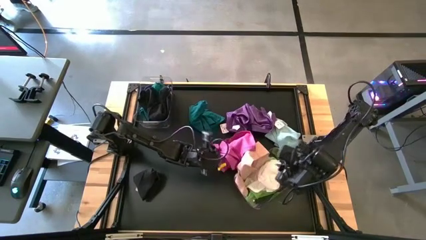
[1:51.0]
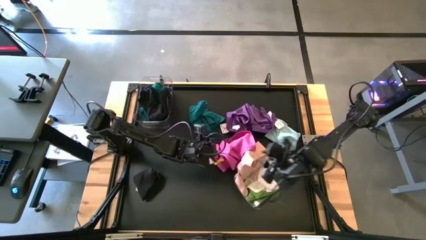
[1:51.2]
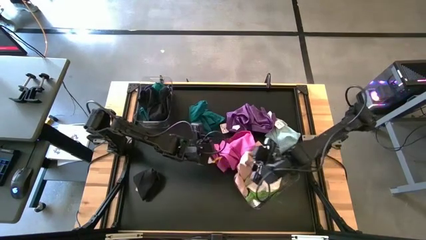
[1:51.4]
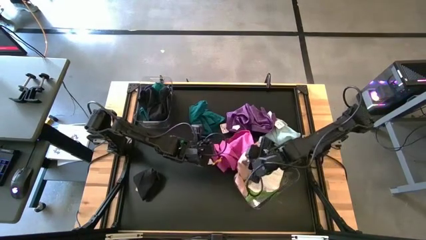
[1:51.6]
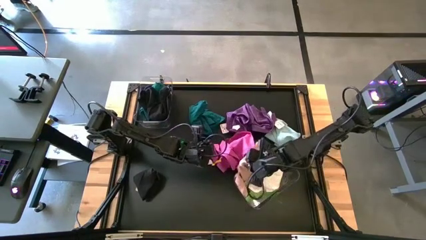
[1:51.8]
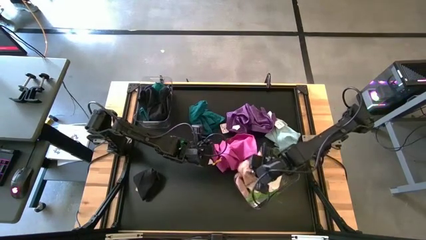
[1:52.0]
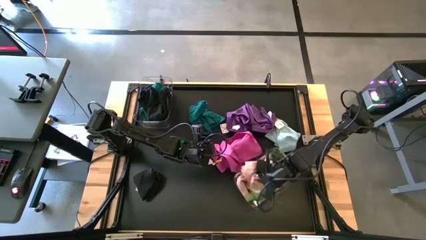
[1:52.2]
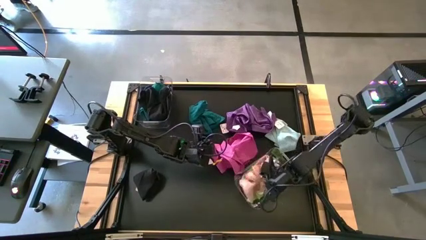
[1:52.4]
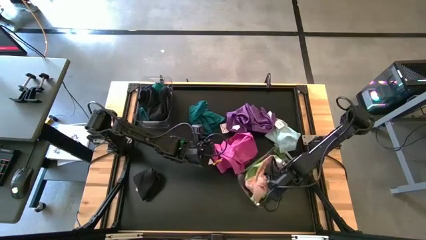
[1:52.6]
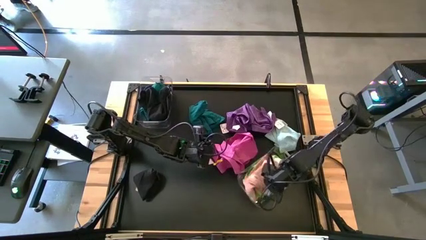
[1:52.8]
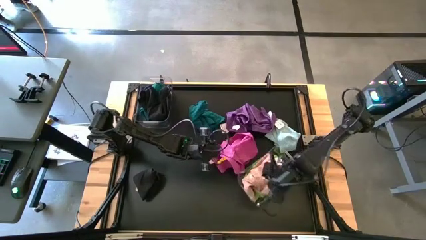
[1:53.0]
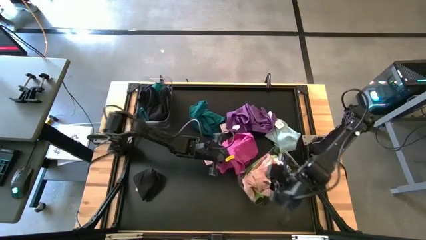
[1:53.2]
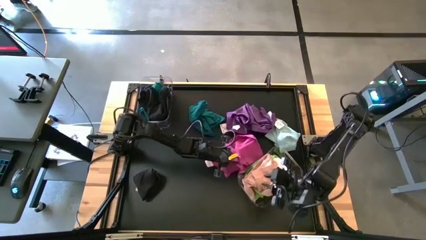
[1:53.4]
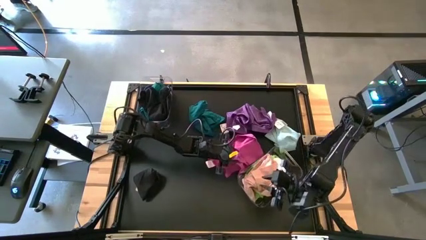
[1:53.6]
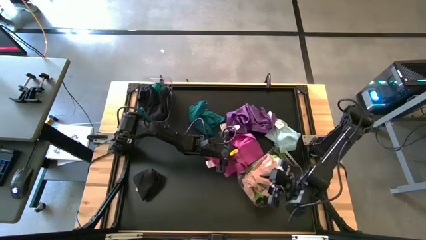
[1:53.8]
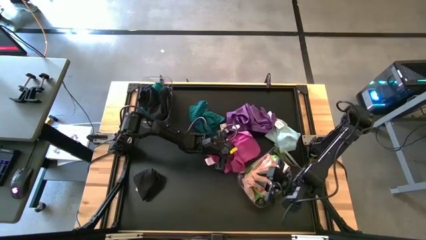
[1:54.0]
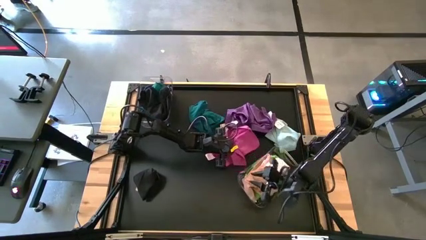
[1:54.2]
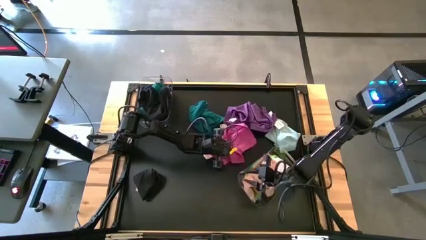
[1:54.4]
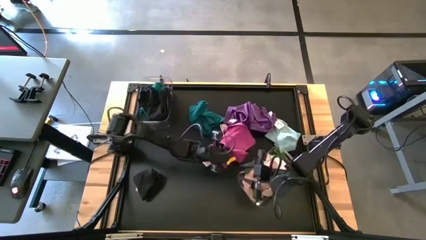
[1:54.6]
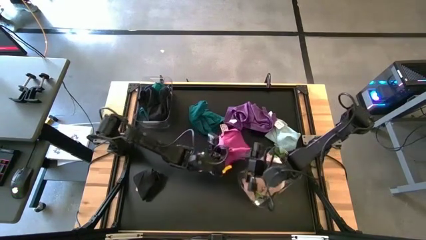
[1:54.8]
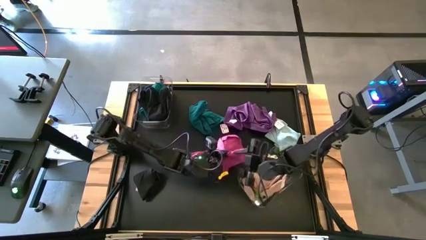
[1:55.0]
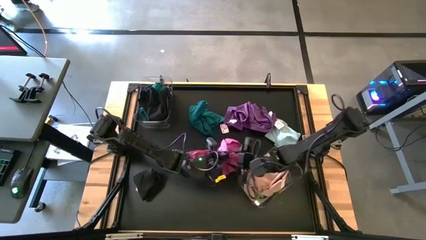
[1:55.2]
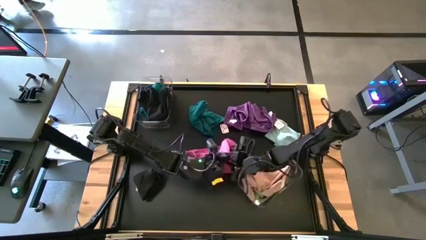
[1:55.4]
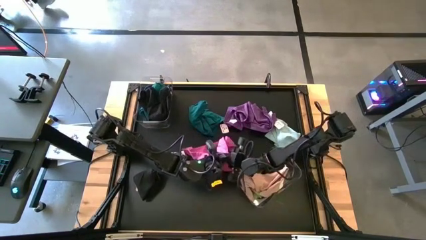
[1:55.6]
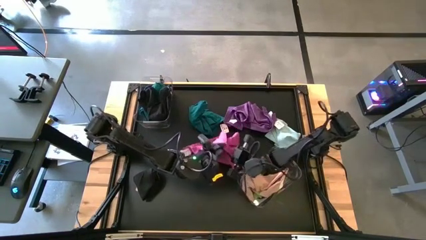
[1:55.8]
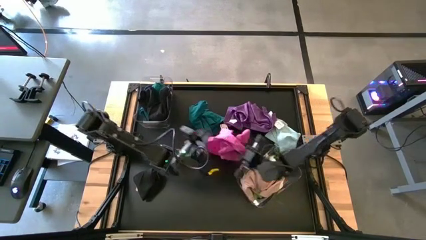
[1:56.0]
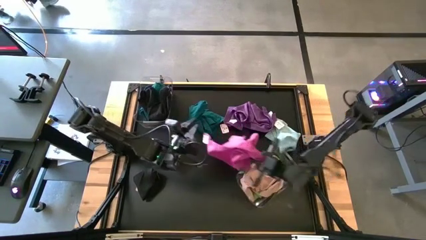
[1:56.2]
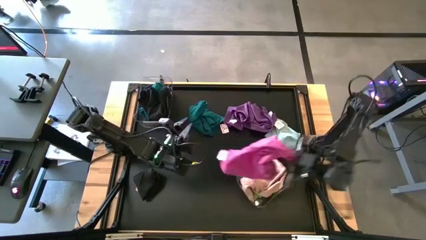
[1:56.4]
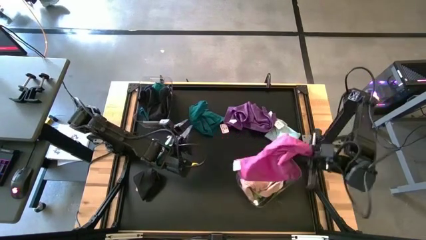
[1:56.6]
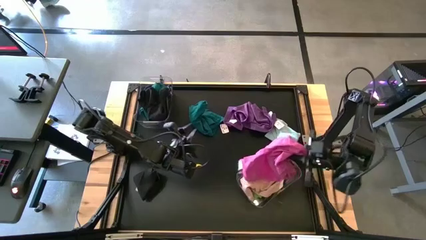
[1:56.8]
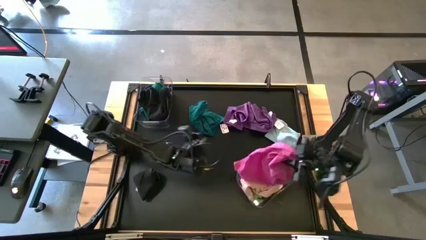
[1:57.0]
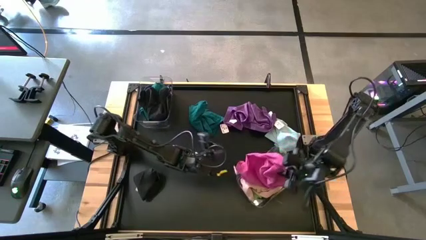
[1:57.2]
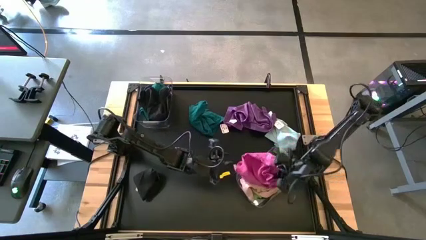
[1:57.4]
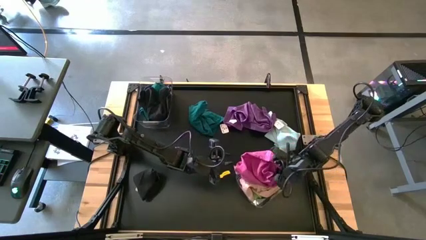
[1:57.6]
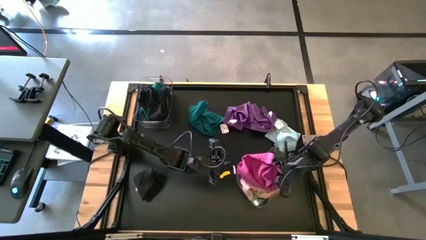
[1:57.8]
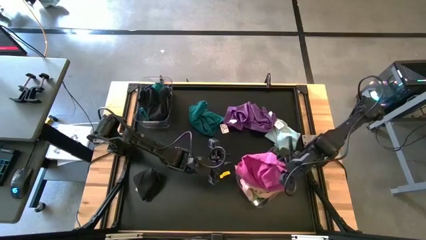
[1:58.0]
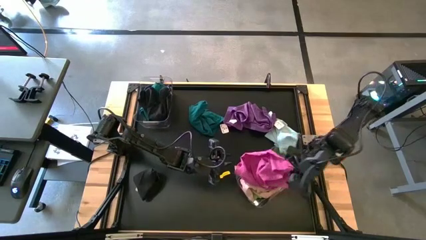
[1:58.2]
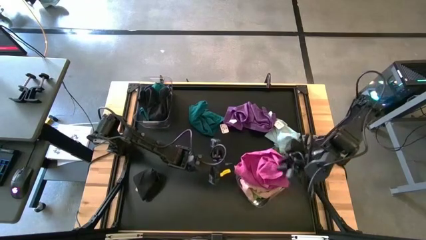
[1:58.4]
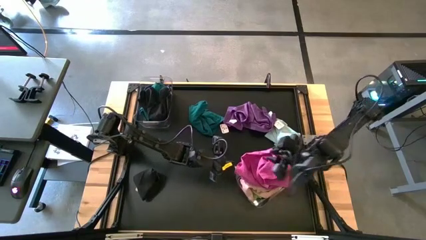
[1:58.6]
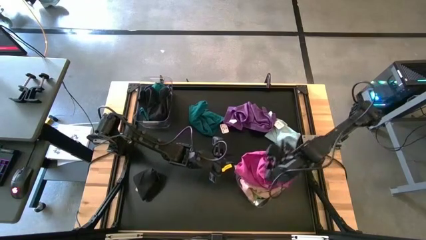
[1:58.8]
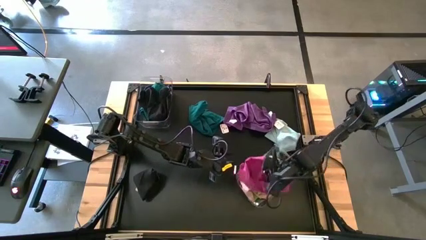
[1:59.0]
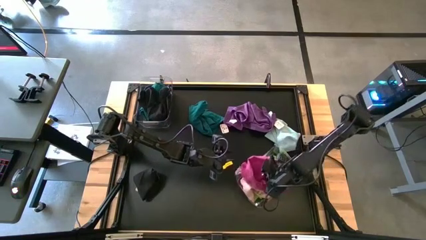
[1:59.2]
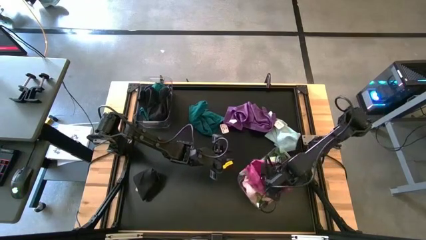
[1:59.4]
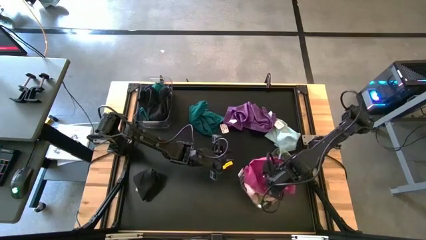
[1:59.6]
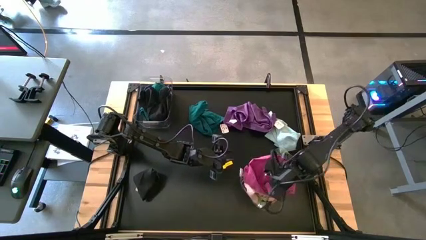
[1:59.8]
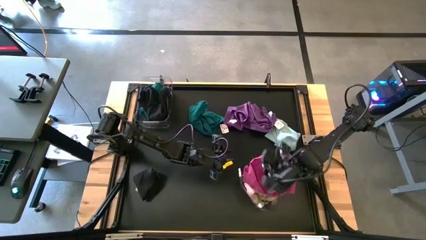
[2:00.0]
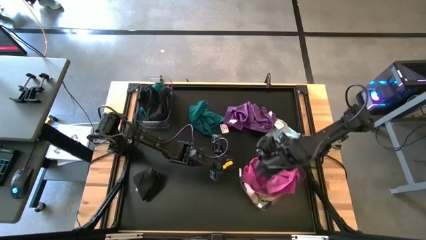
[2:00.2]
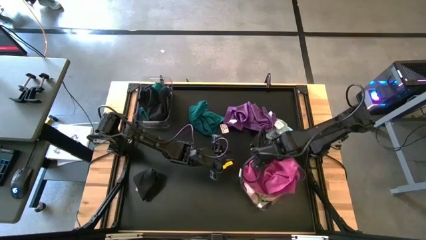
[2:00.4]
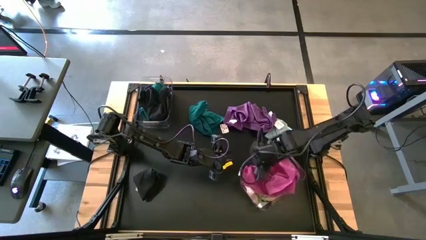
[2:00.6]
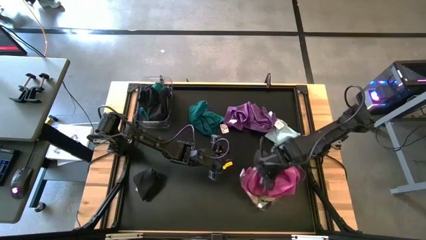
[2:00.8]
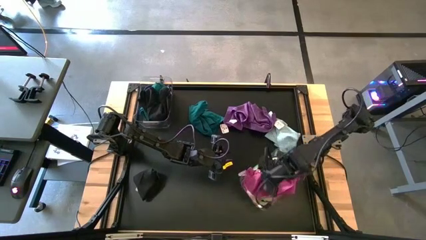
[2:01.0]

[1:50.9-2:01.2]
Task: Sort towels by color in basket
Put the pink towel into the bottom transparent bin

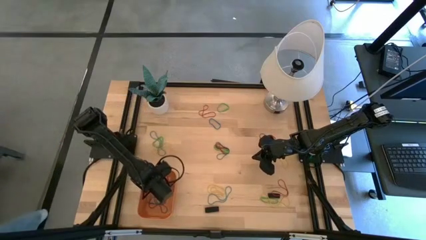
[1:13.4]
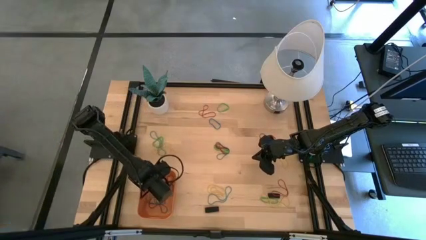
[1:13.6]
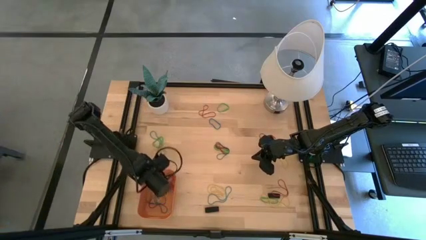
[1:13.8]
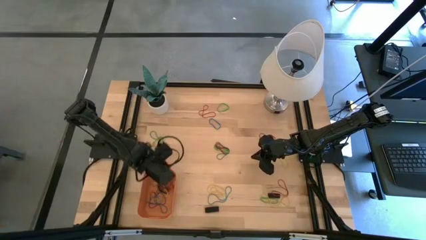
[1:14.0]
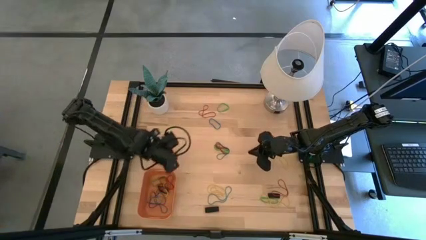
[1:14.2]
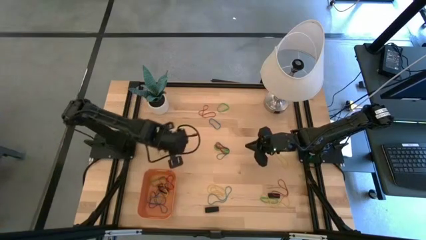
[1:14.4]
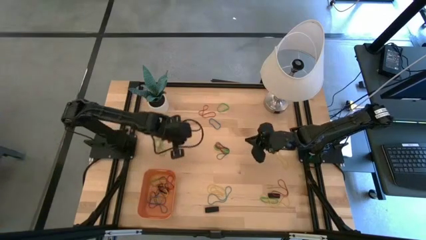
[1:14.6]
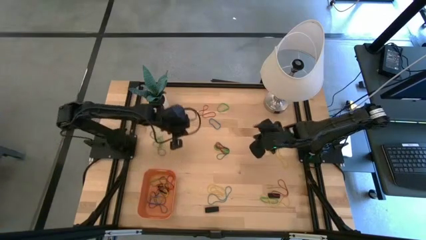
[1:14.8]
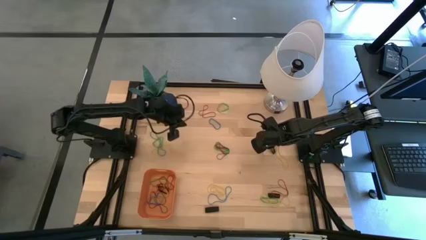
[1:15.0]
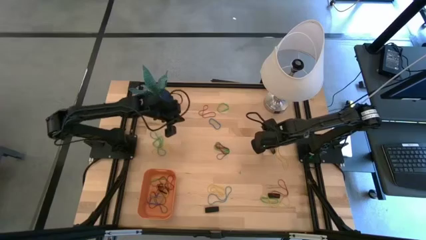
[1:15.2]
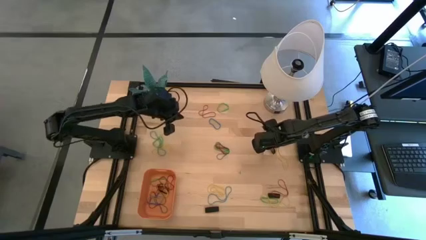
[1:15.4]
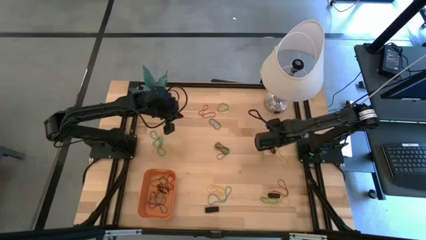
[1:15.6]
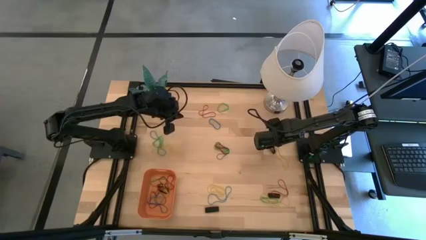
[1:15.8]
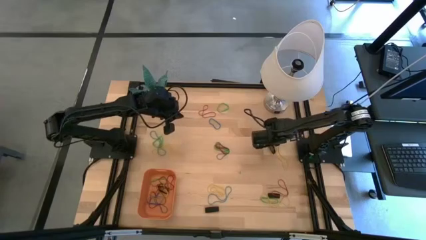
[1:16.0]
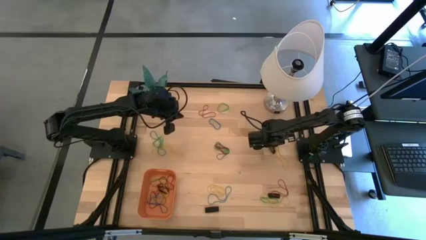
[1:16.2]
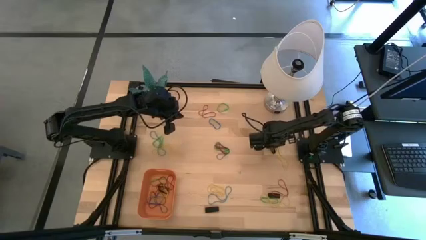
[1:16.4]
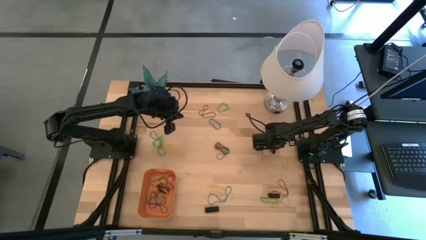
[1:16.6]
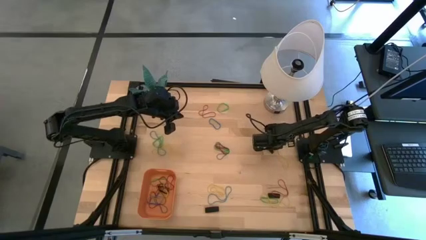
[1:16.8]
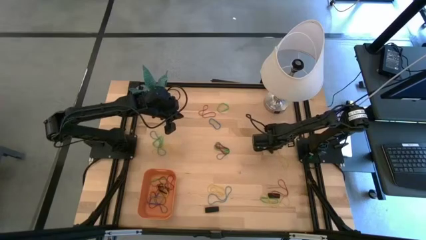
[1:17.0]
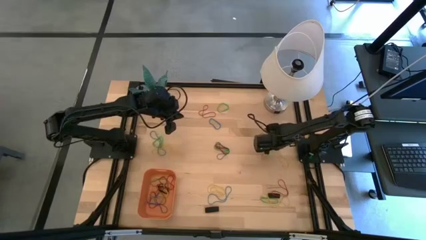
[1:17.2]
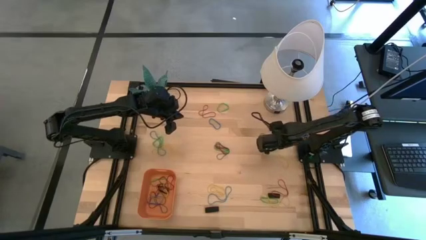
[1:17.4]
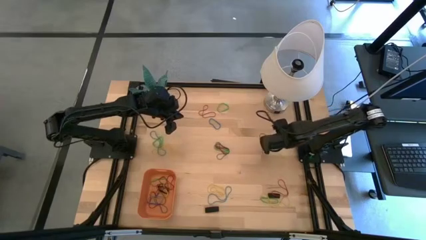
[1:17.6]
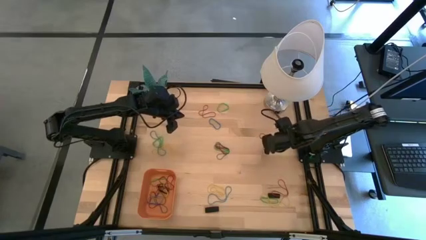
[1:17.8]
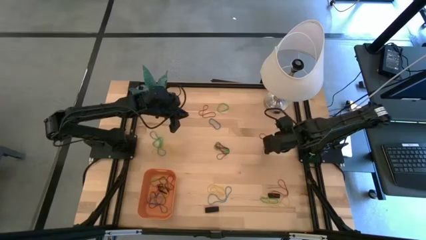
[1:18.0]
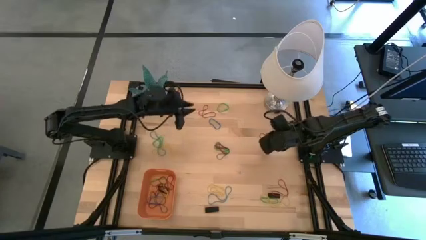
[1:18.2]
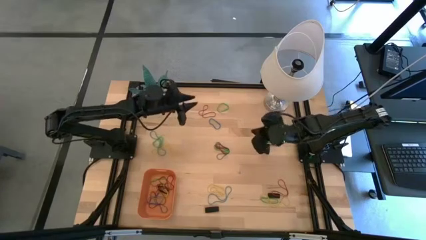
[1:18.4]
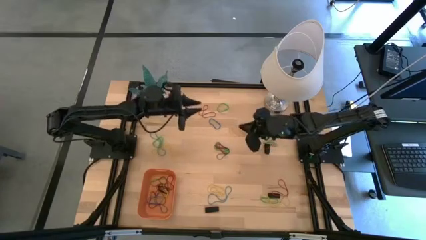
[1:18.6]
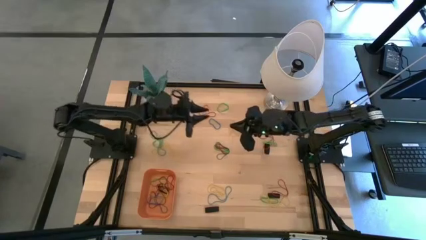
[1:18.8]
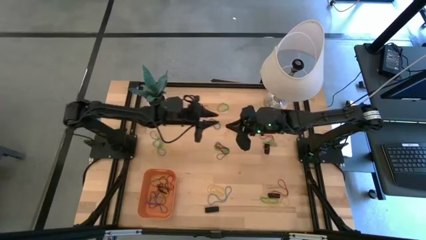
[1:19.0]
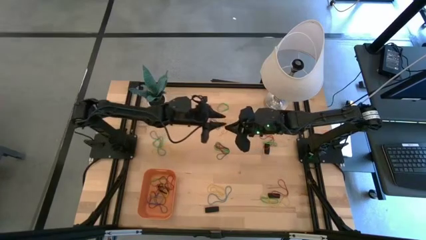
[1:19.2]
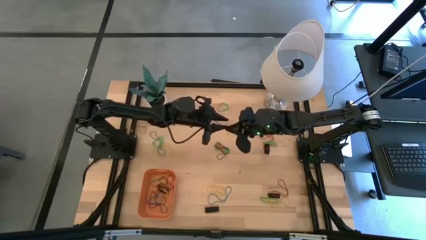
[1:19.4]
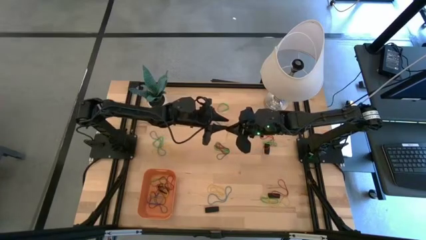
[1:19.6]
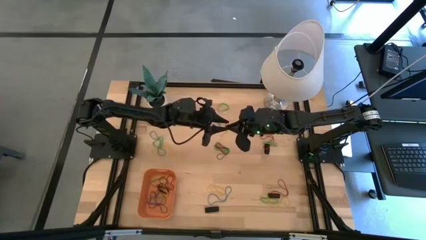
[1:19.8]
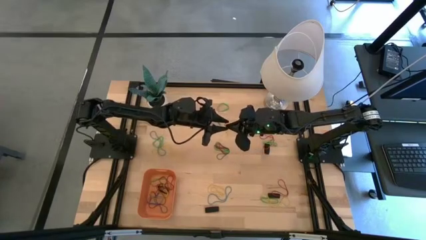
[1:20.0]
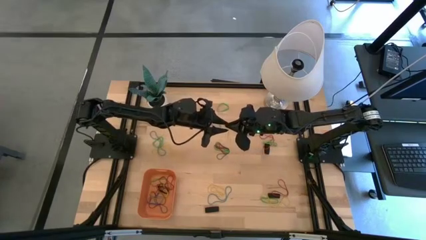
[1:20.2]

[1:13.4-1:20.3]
Task: Pick and place rubber bands into bin
Put the yellow rubber band into the orange bin
